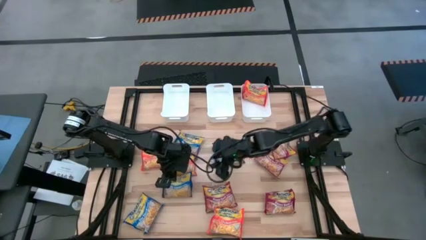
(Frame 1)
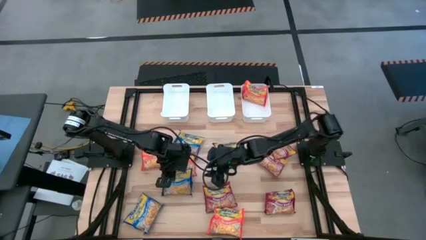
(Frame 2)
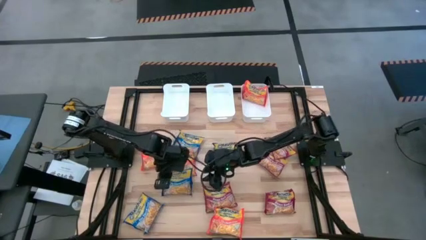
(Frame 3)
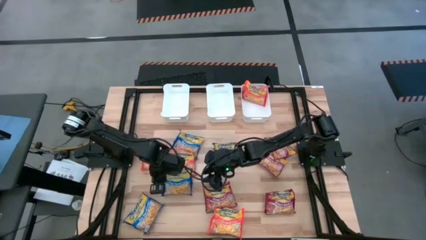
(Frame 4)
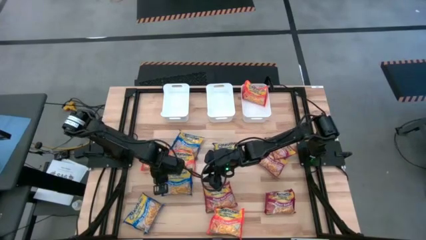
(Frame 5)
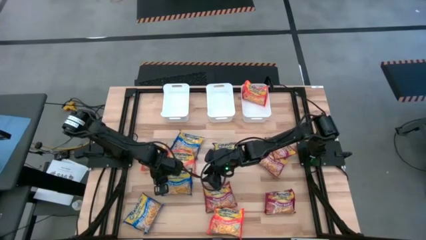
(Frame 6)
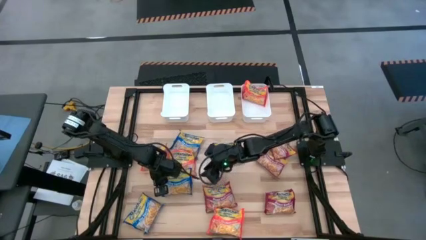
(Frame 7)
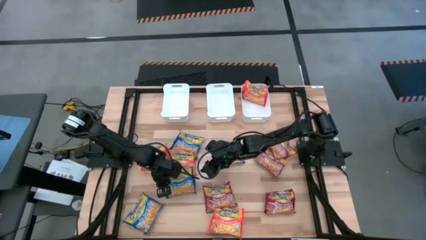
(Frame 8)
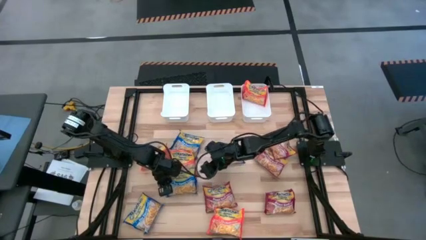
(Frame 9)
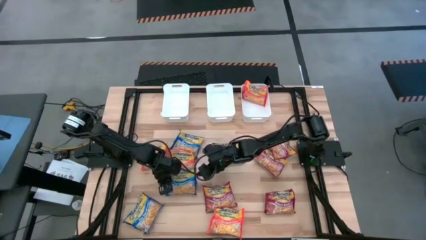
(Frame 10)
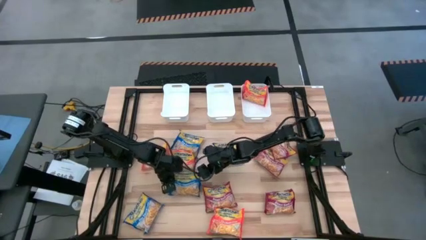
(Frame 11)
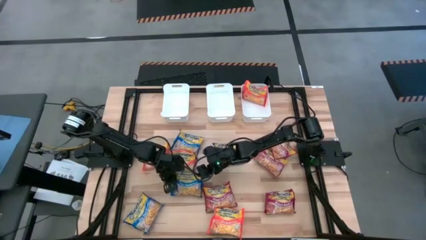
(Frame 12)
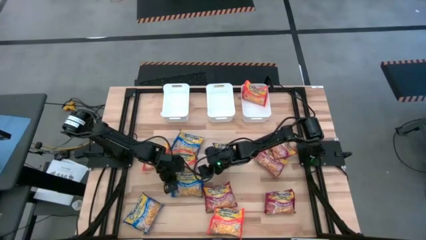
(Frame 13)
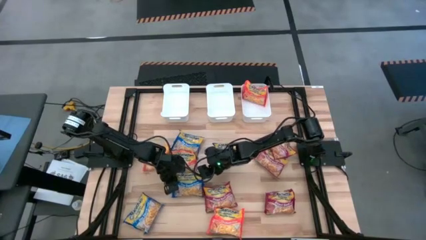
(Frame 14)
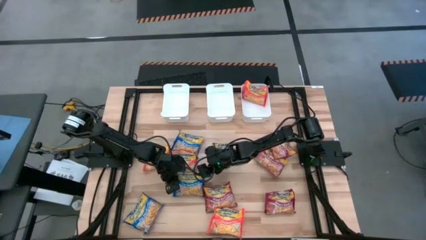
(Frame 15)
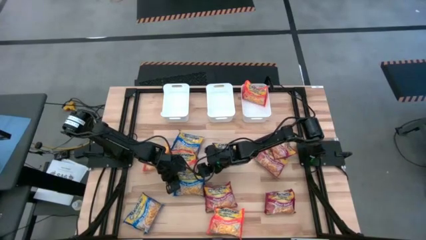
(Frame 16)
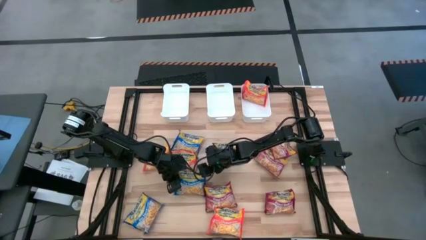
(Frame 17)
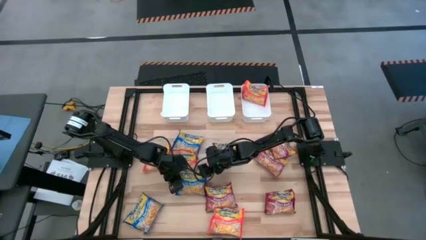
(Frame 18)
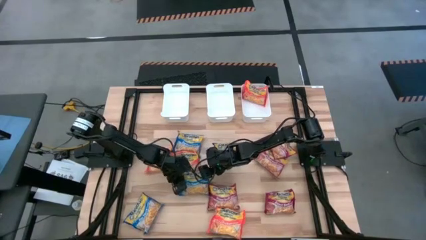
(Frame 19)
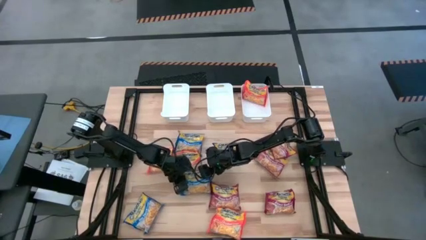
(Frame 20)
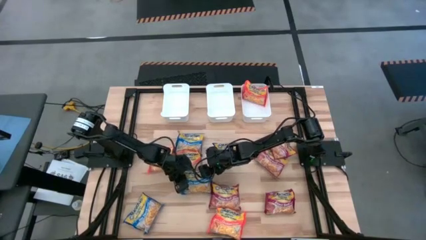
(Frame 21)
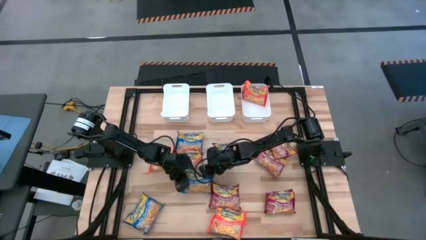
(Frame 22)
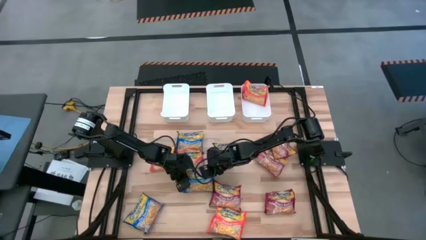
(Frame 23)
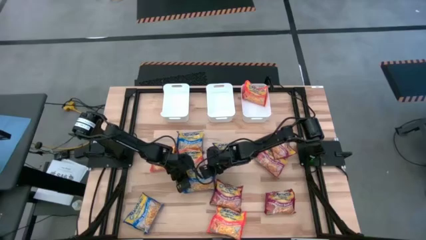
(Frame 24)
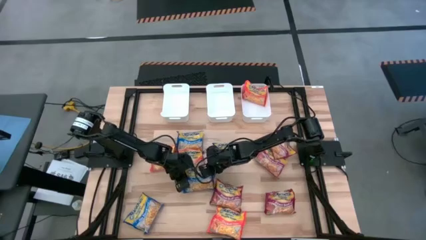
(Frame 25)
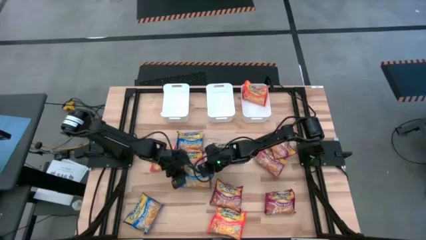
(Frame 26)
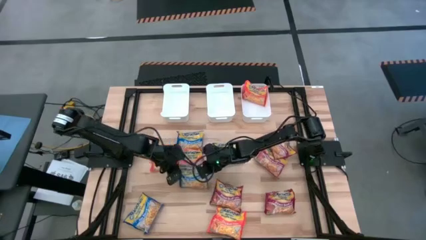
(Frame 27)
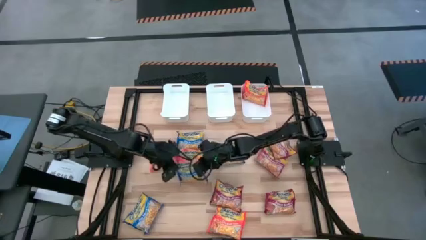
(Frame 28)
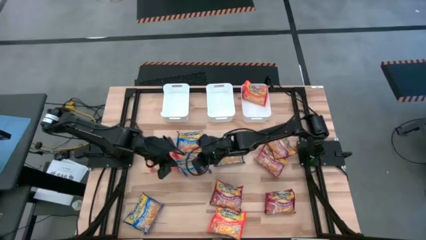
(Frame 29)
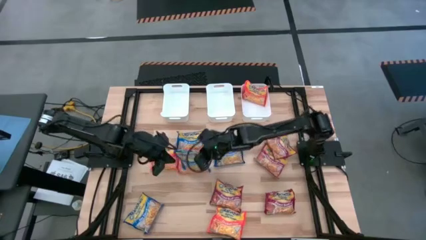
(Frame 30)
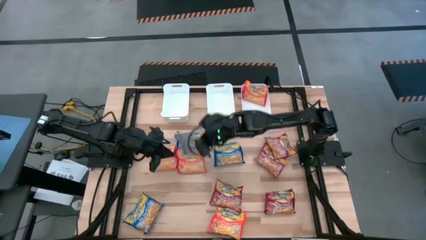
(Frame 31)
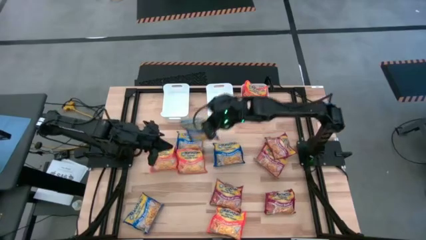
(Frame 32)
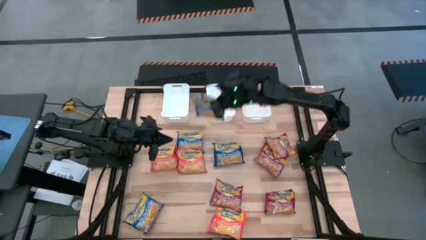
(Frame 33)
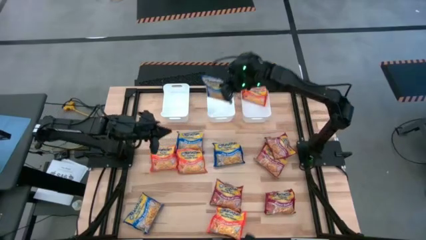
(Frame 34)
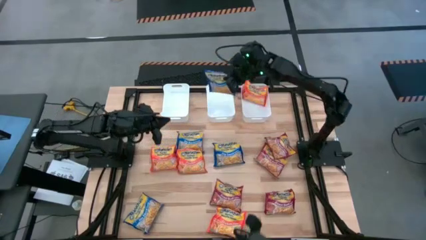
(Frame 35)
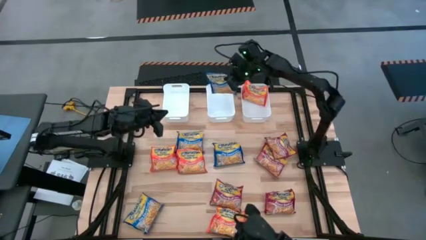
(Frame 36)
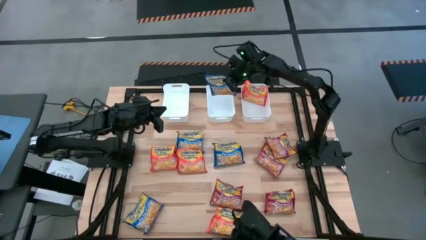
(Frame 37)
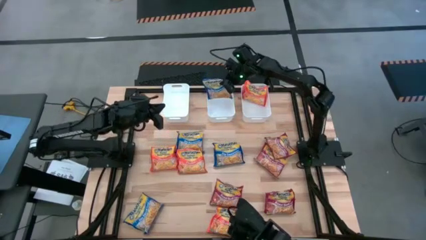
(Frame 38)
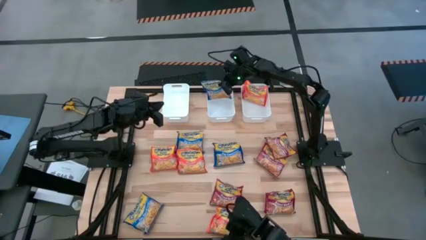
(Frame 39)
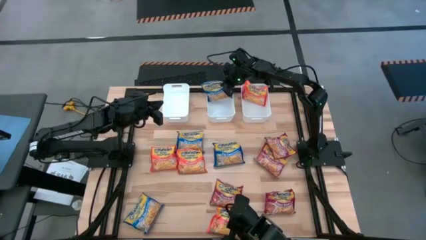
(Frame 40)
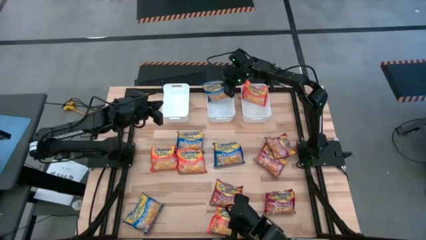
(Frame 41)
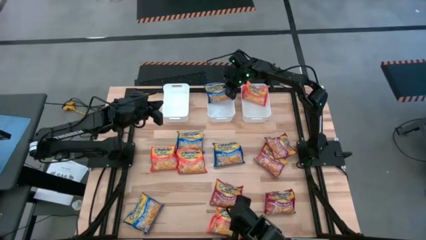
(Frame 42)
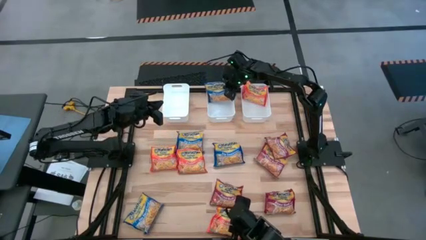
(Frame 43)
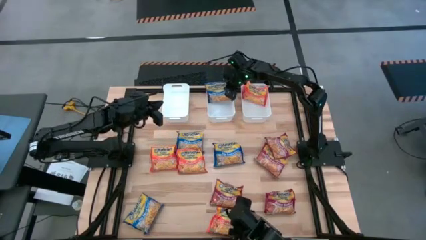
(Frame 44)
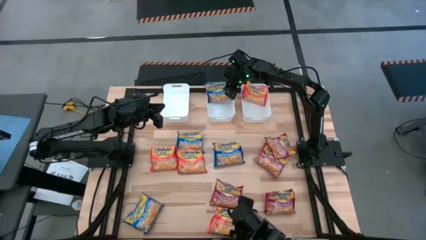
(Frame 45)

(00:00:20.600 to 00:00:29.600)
Task: Sort Maruchan noodles
Put the bottom right blue noodle pack into the top middle white bin

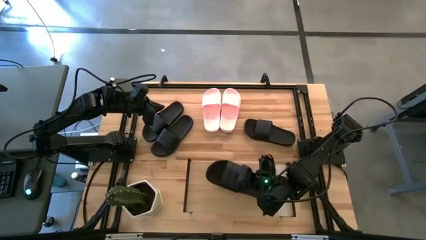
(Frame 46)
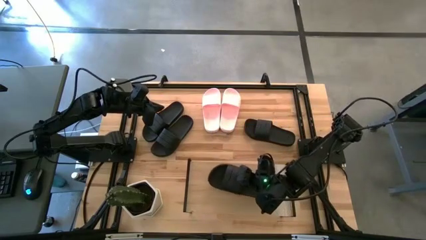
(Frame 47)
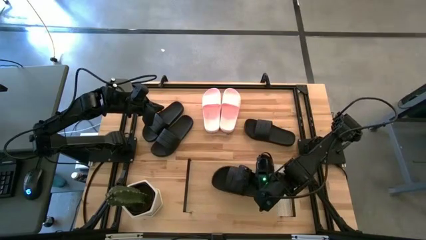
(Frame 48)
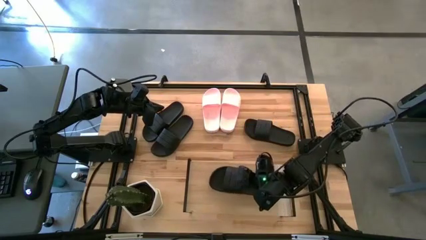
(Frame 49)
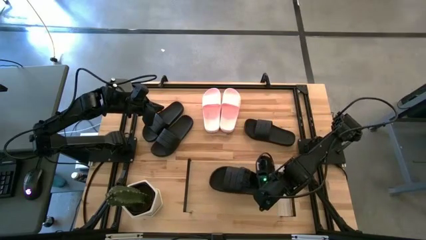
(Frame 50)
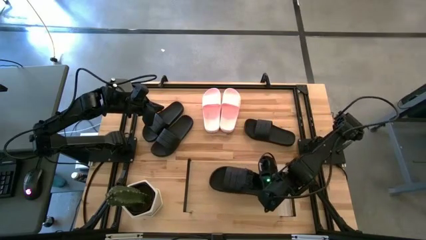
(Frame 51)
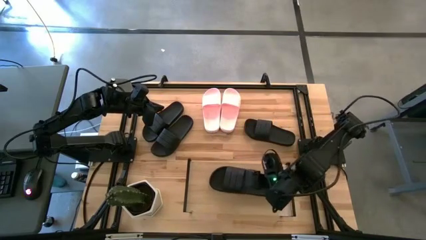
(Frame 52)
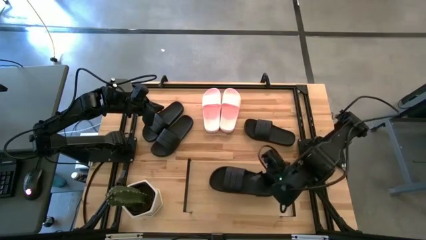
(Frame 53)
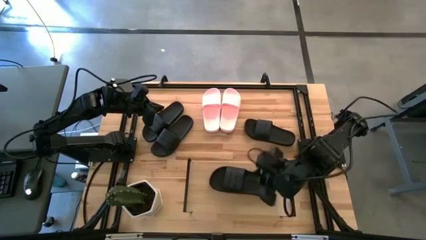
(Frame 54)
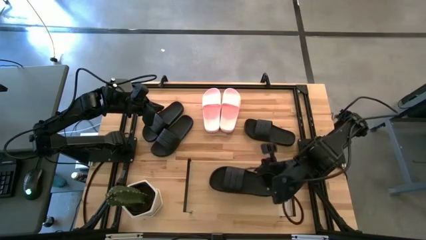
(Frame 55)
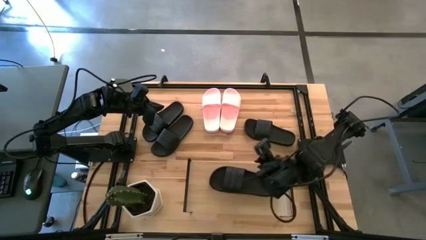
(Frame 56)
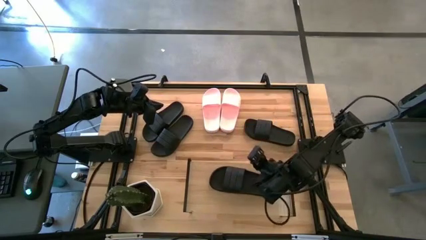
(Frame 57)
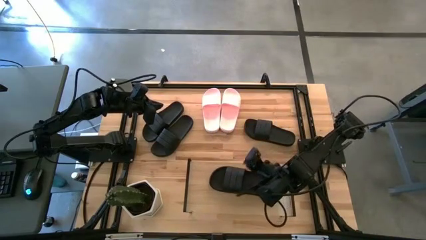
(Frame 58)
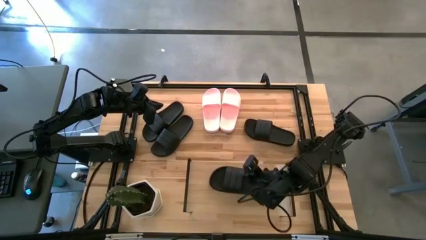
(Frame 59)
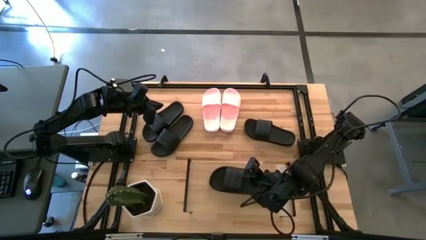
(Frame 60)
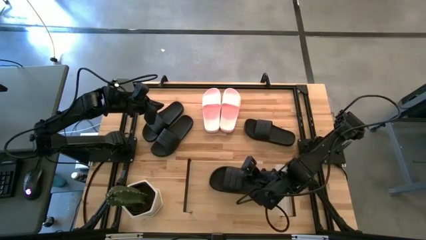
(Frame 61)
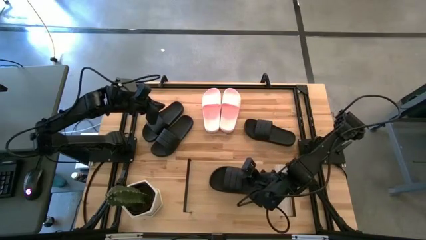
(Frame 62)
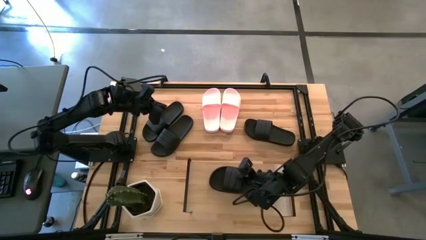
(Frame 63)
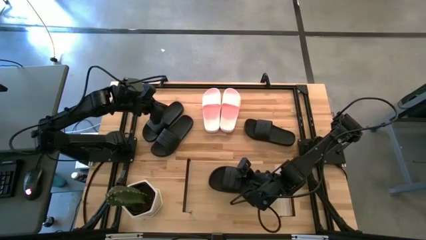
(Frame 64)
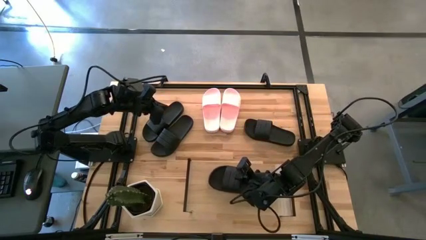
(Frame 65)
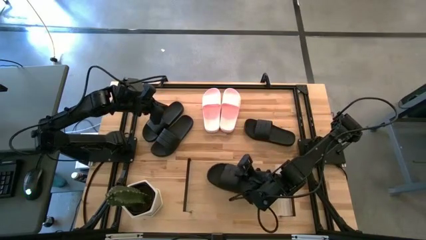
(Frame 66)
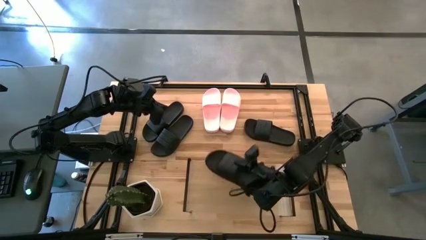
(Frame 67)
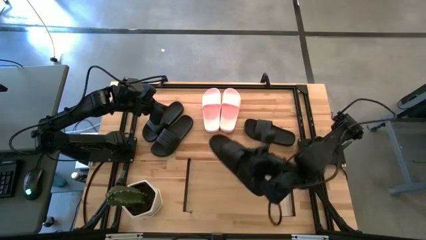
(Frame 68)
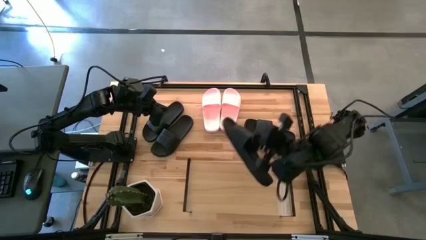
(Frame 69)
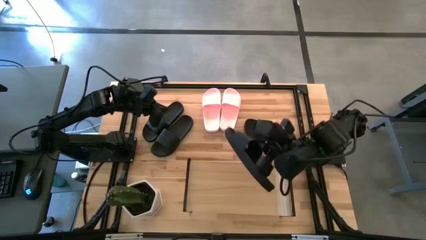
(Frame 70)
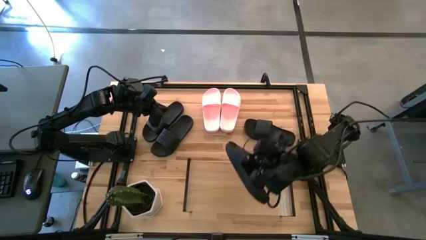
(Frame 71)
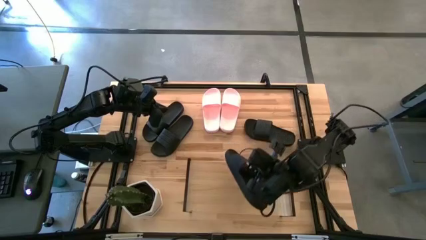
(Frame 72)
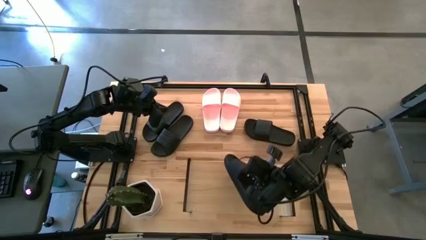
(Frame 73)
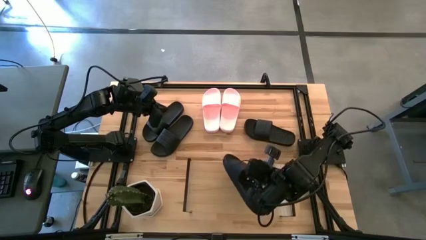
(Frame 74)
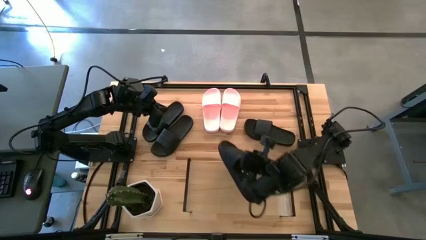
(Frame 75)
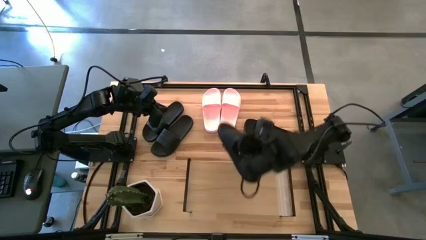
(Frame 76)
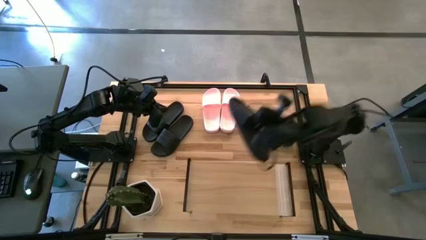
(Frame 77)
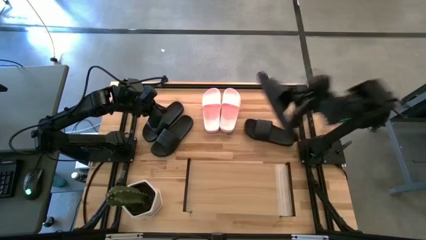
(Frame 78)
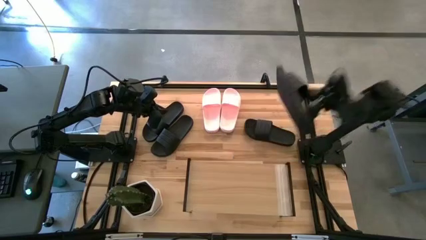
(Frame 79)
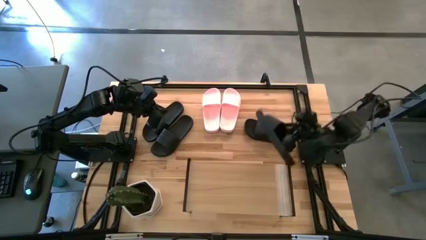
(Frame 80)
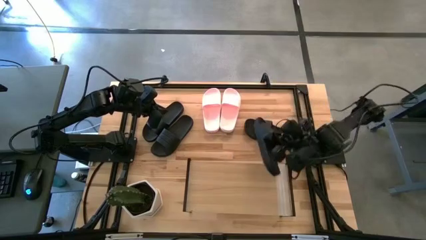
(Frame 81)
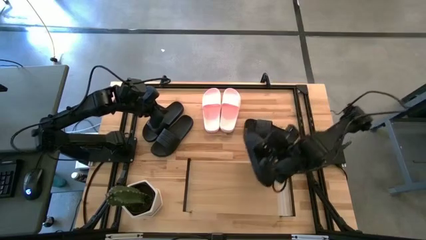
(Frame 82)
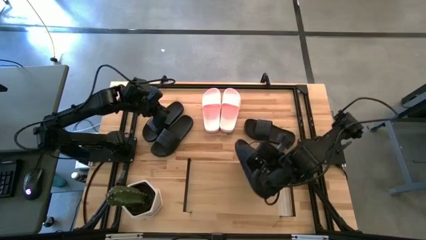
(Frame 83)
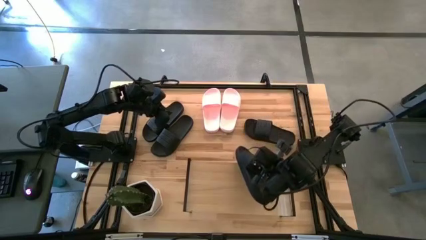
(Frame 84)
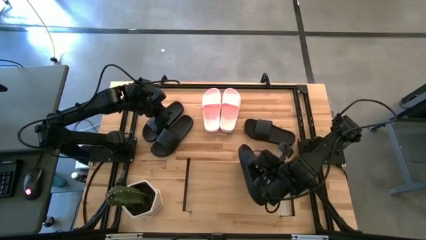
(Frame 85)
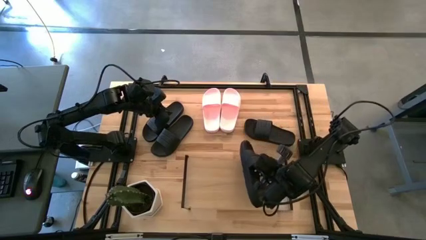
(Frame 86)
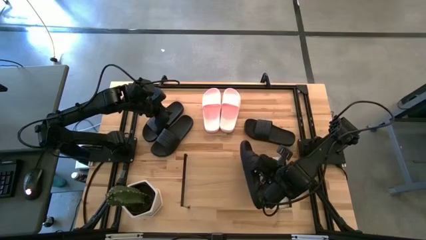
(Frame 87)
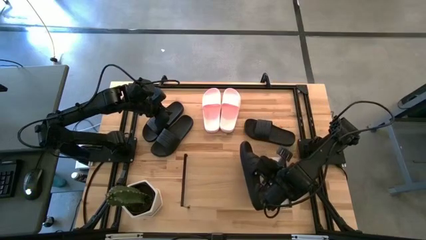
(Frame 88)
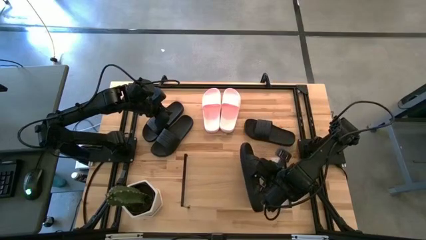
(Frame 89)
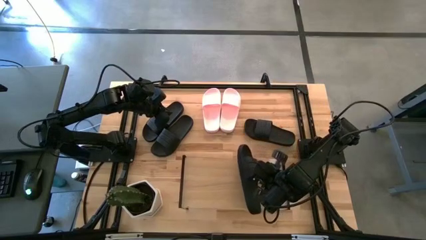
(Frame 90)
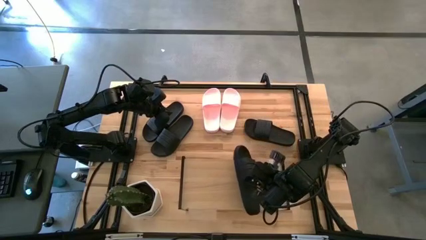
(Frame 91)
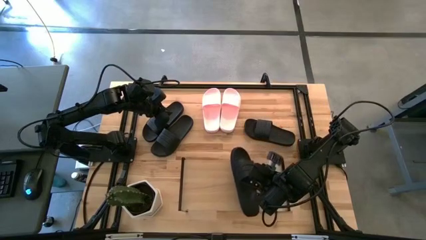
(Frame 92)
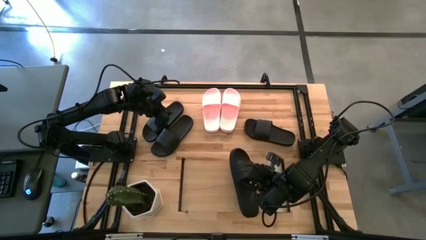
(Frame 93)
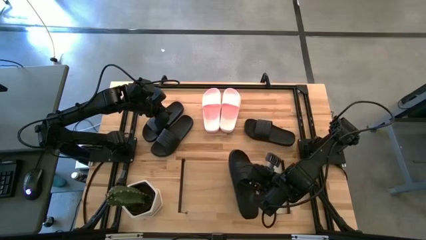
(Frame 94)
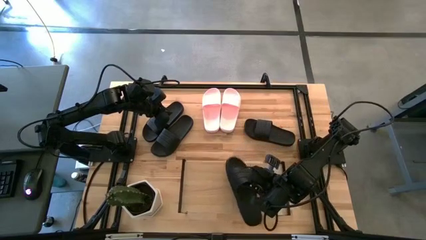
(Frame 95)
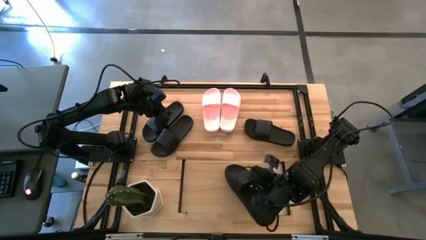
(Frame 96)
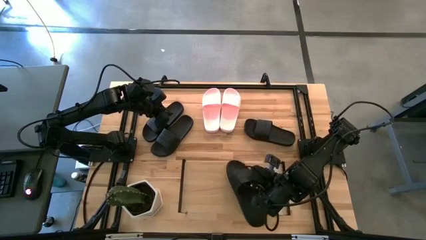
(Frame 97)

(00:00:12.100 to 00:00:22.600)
Task: Pick and place slides into the shelf
Put the black slipper on the shelf
